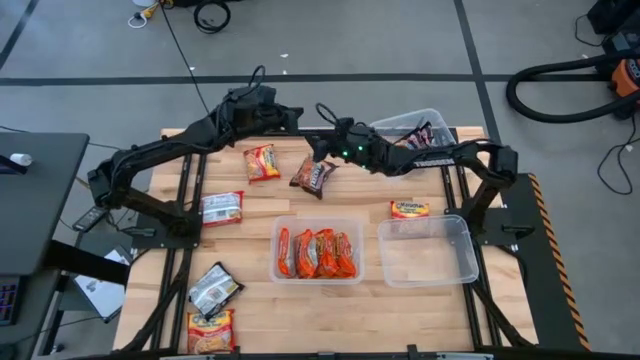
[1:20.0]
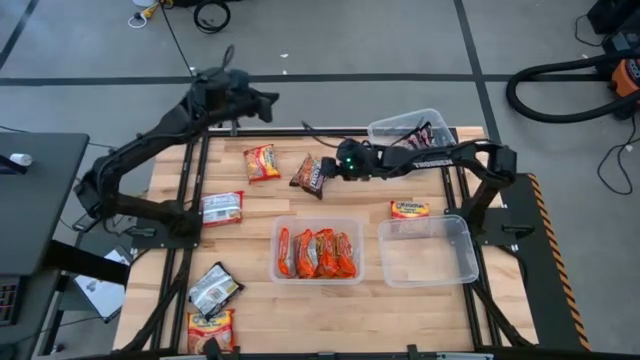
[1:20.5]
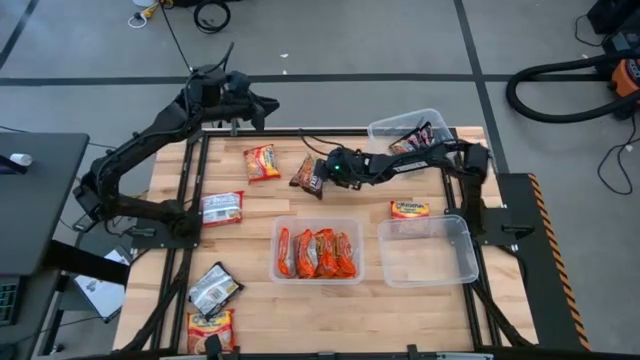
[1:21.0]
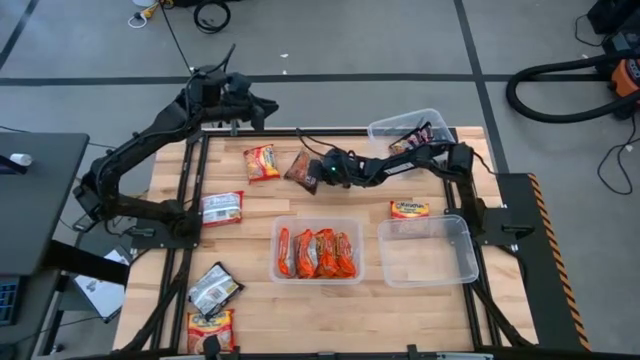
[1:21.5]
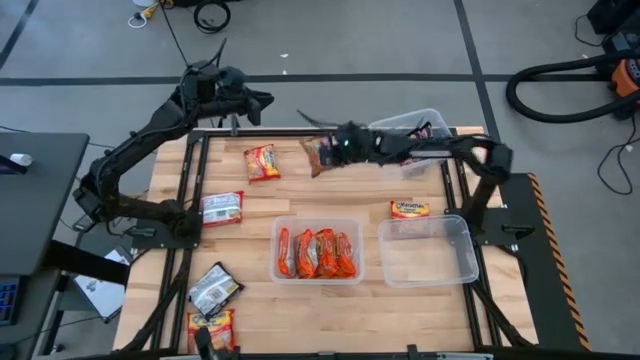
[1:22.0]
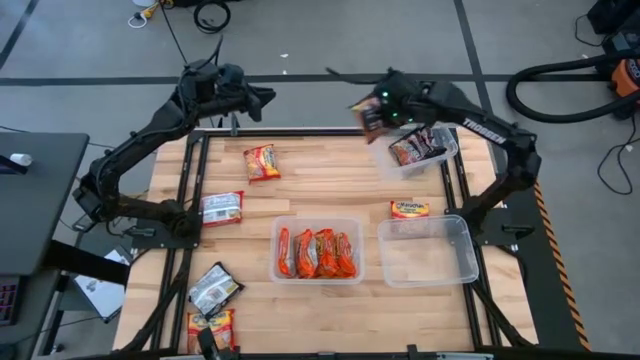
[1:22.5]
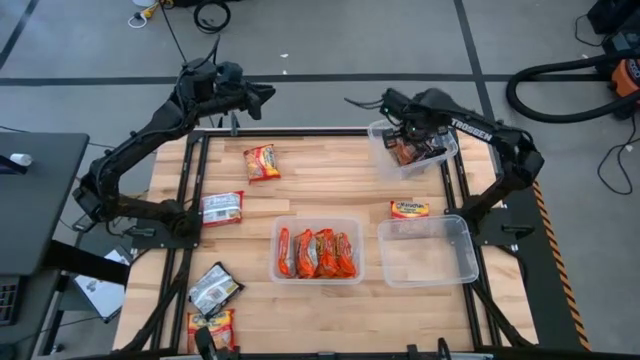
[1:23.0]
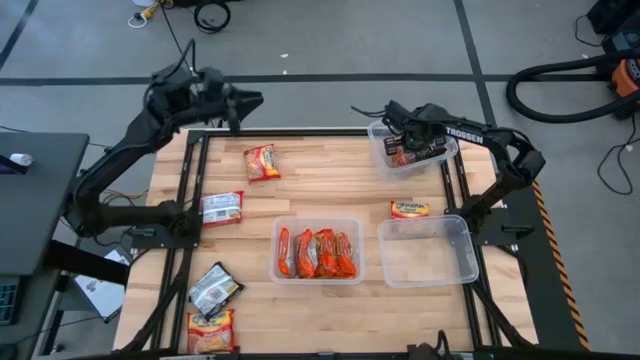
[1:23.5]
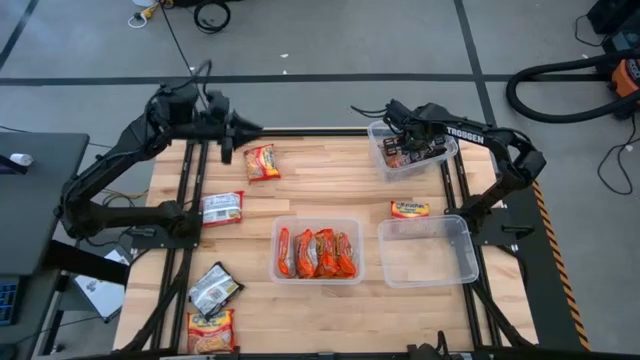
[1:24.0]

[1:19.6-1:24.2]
Task: Sort Maruchan noodles
Put the black noodle pack into the top transparent bin

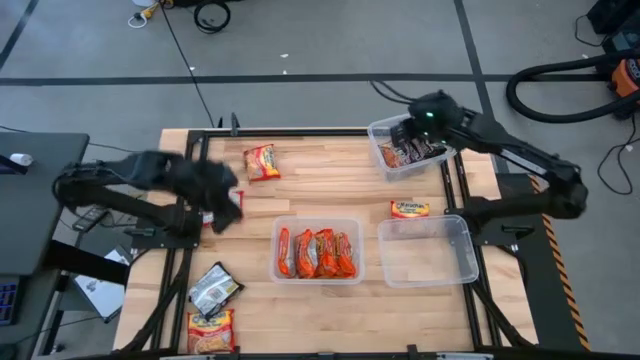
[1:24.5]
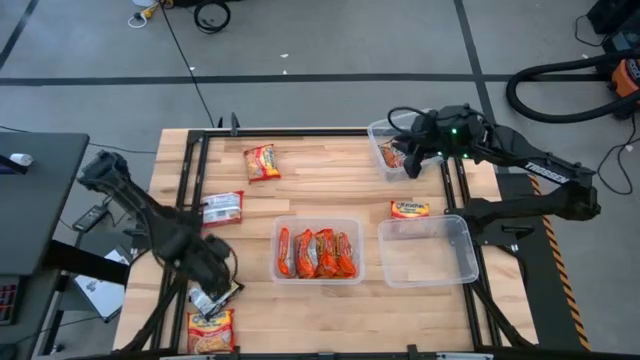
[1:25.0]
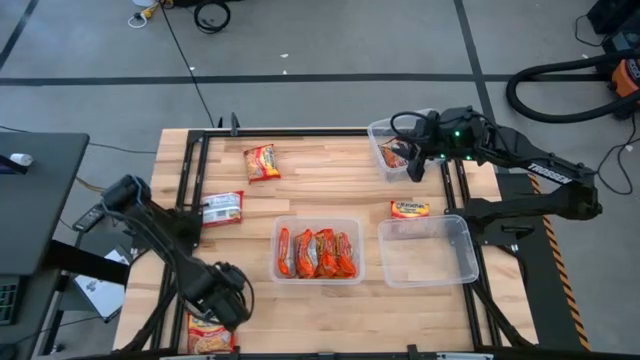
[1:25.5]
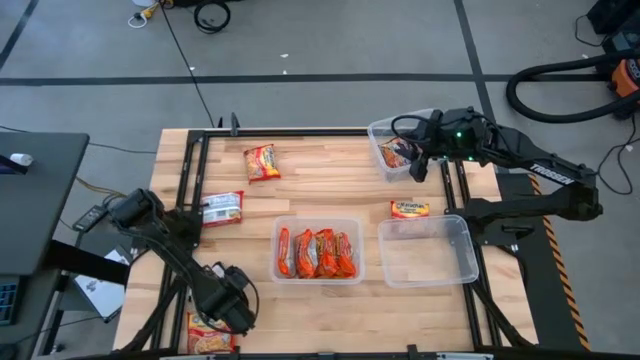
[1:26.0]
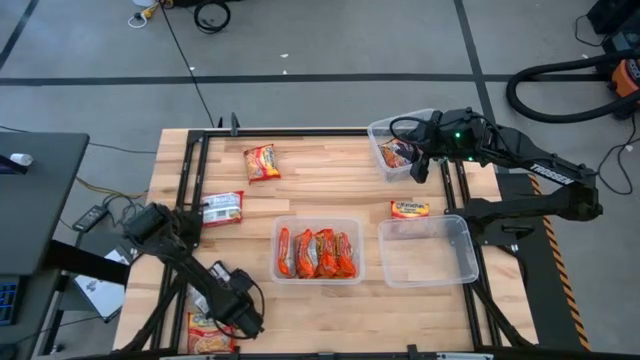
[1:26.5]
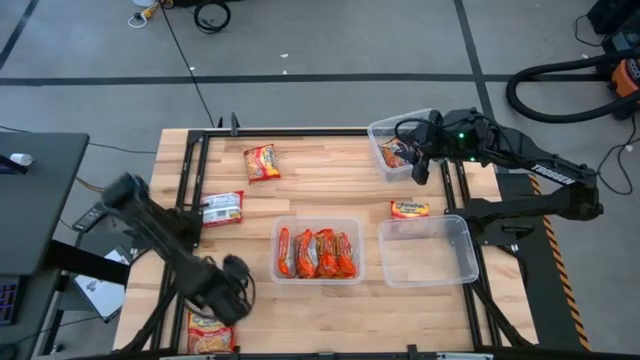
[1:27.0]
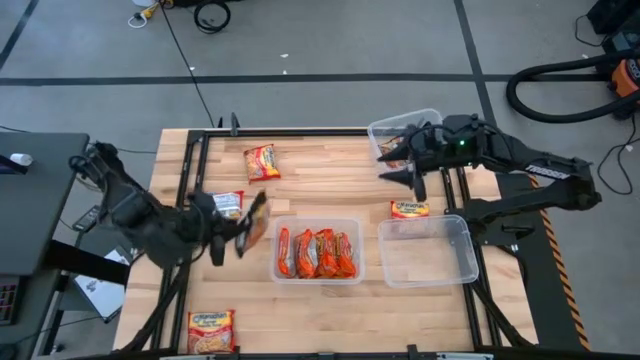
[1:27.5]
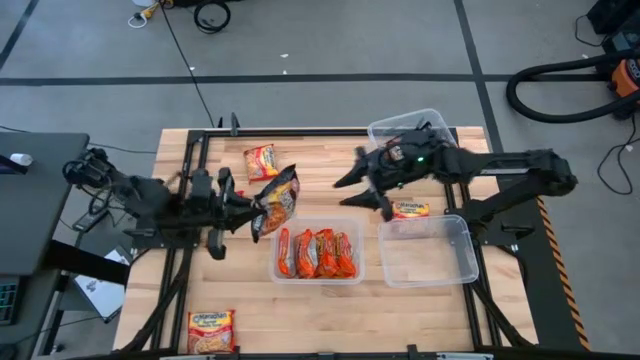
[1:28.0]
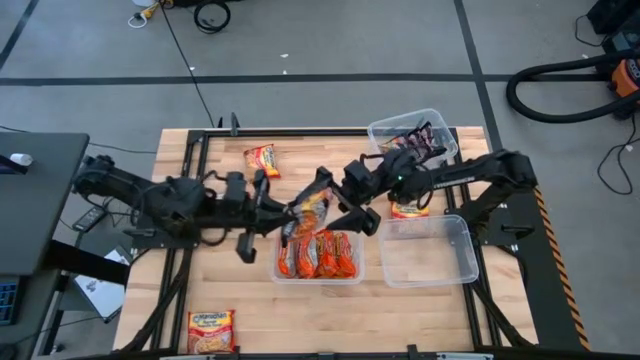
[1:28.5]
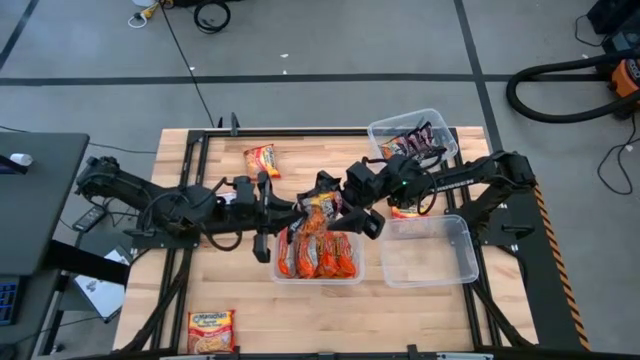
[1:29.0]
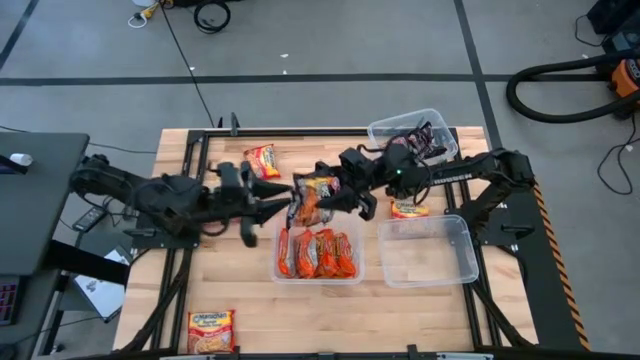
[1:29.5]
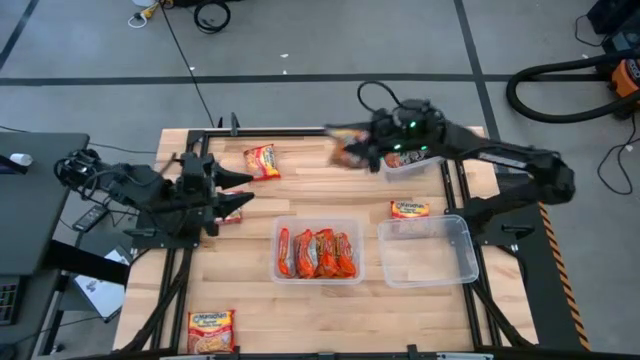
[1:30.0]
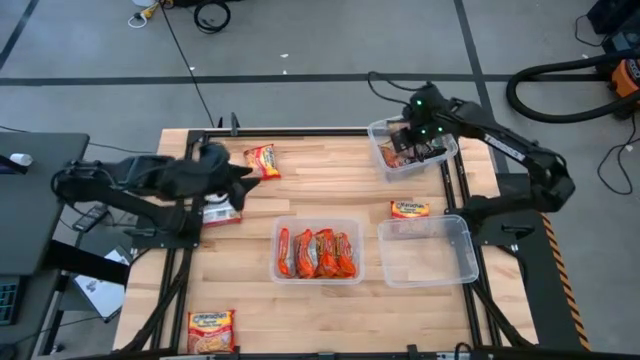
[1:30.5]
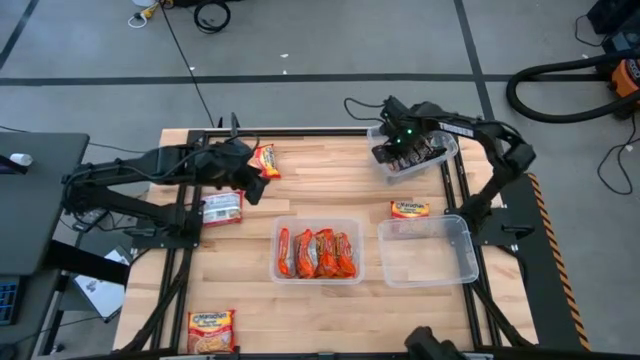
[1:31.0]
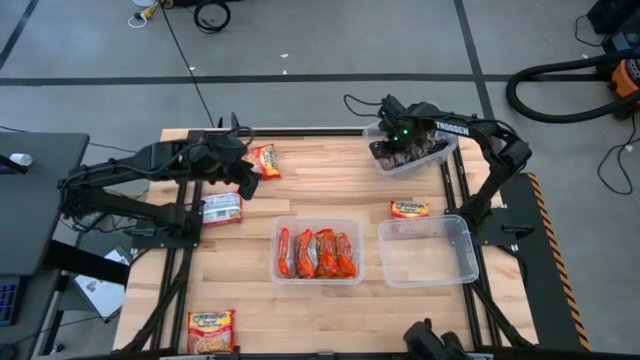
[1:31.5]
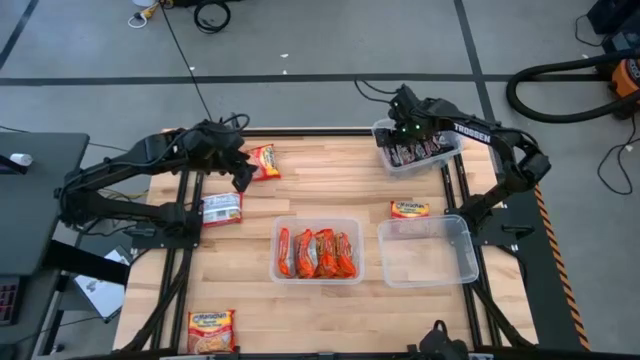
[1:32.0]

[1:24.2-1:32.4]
Put the black noodle pack into the top transparent bin

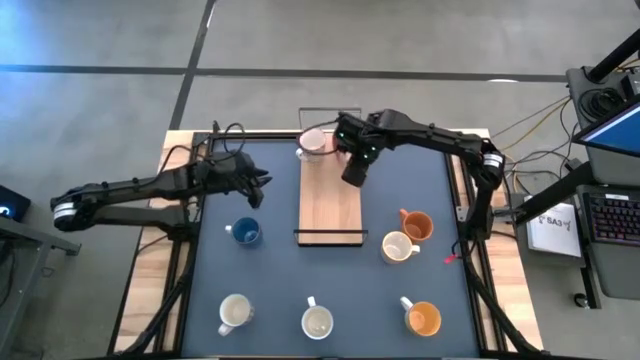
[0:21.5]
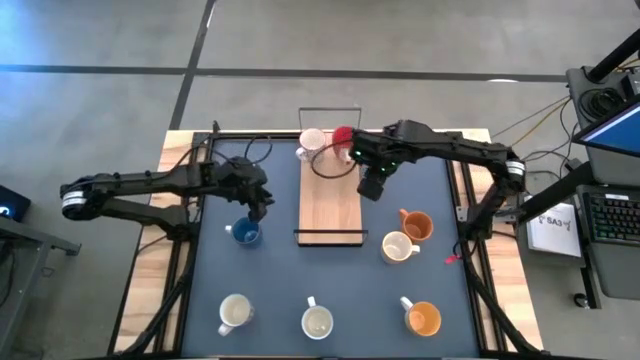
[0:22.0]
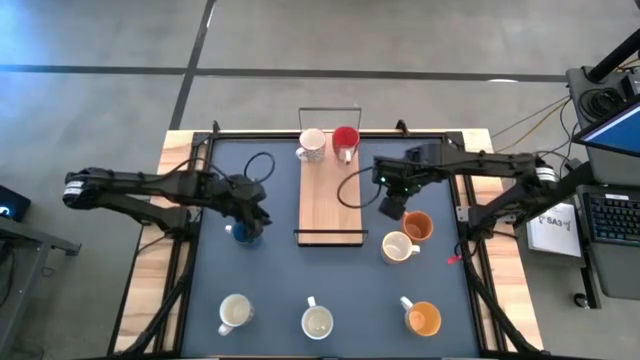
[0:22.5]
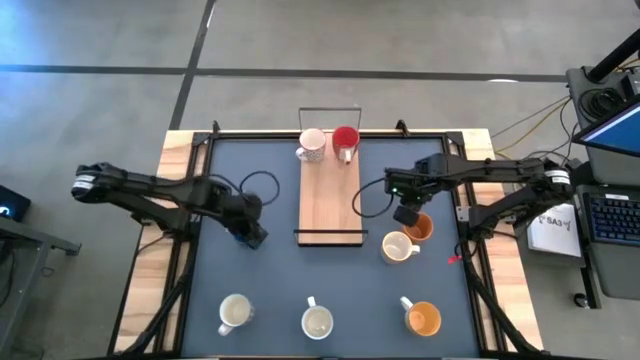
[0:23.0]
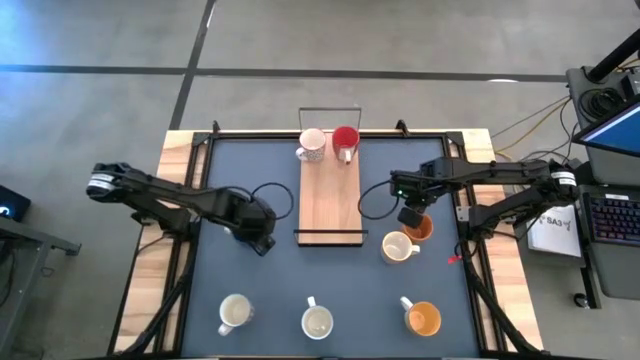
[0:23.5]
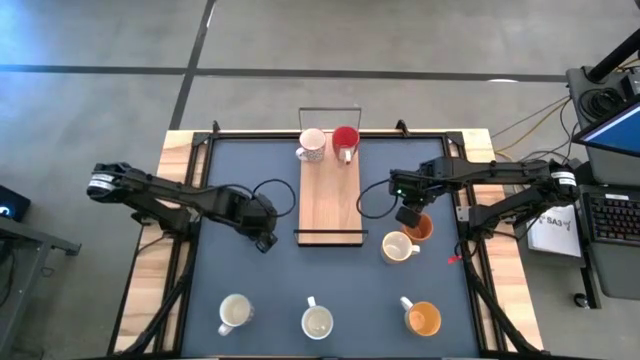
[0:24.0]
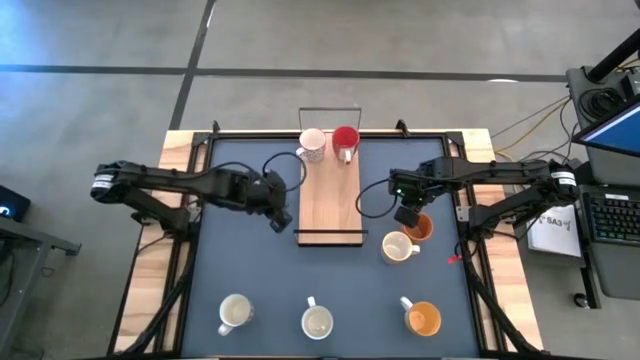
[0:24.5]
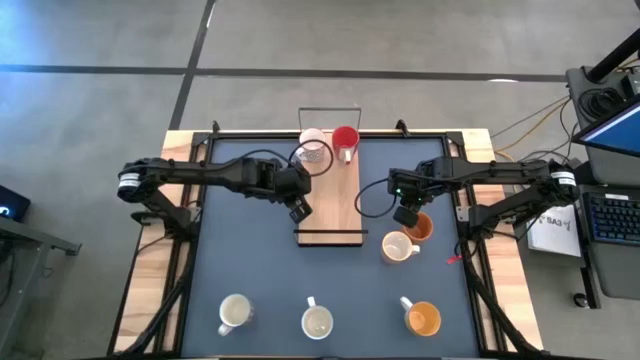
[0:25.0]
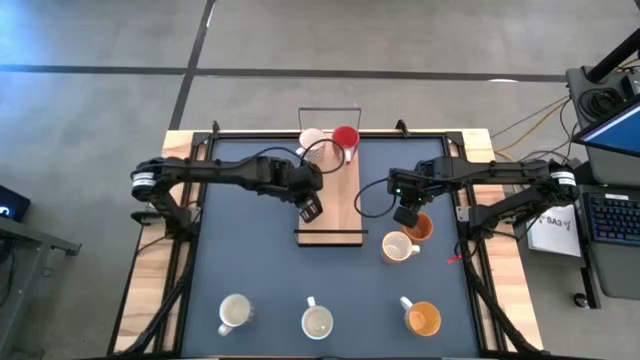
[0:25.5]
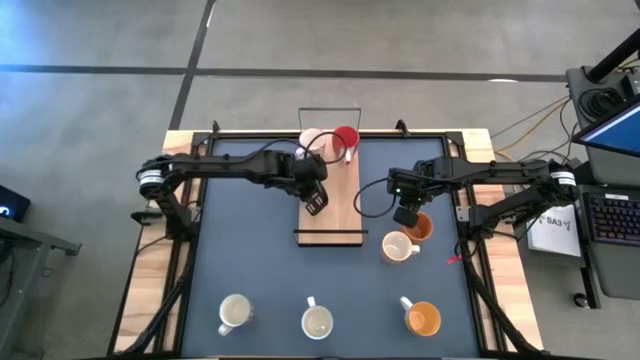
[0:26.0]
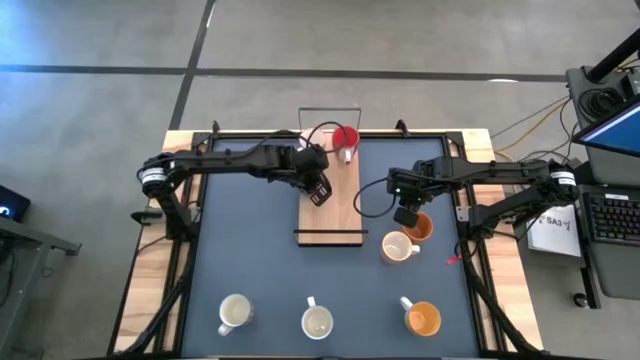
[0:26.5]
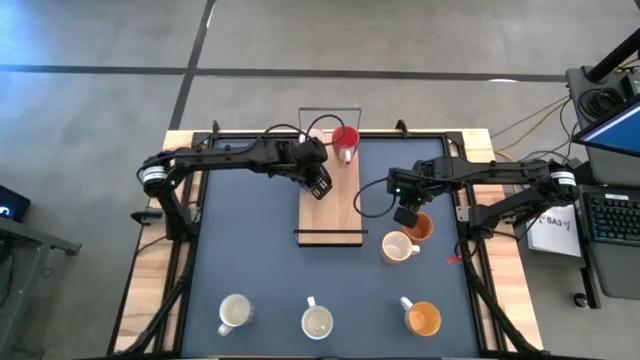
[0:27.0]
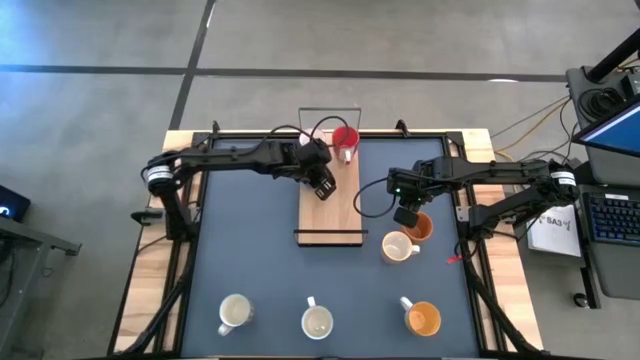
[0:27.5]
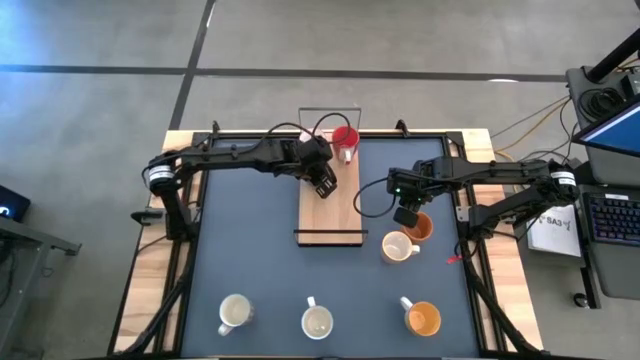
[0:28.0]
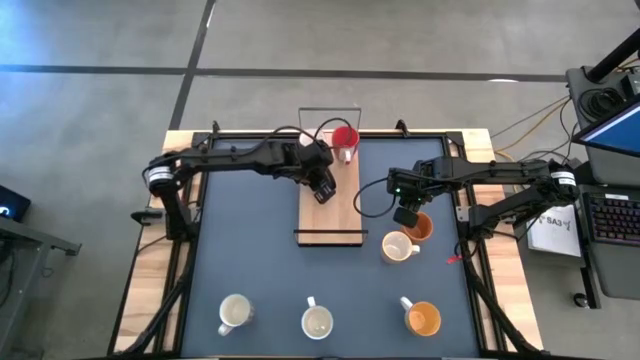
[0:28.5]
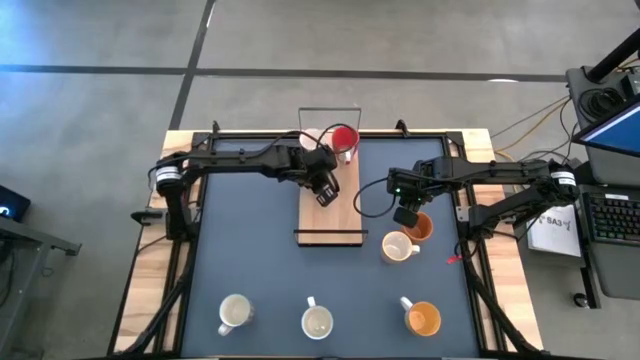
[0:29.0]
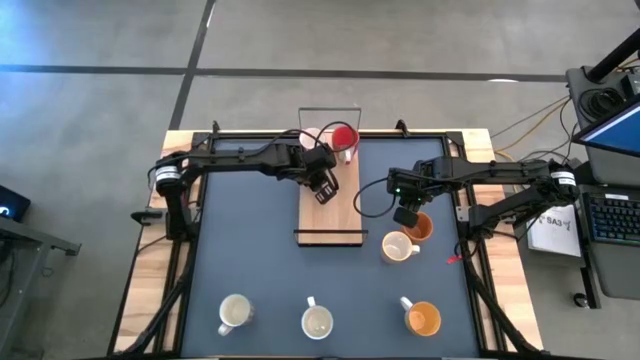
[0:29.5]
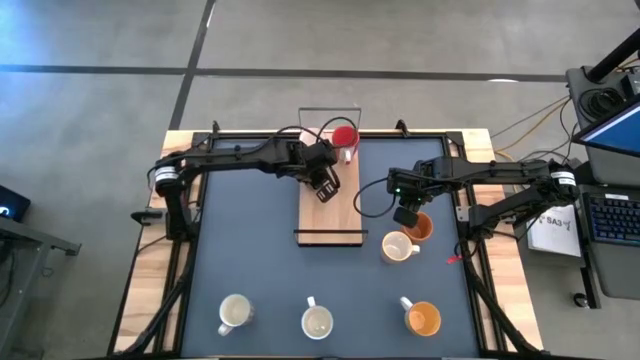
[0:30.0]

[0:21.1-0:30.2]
Task: Place coffee mugs
Put the blue mug on the shelf
